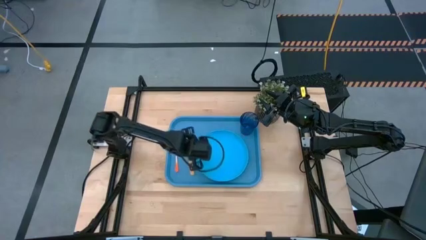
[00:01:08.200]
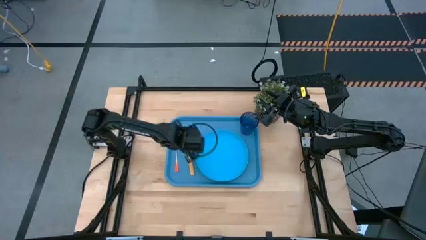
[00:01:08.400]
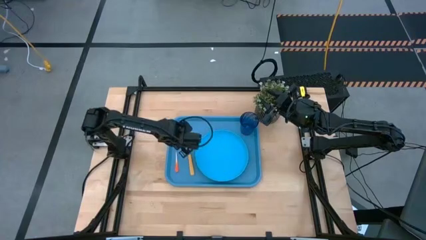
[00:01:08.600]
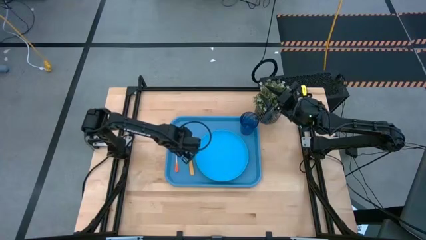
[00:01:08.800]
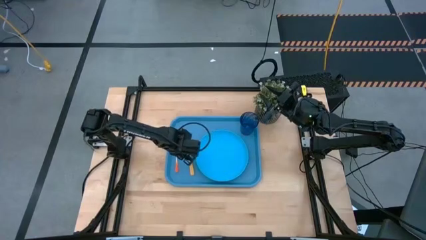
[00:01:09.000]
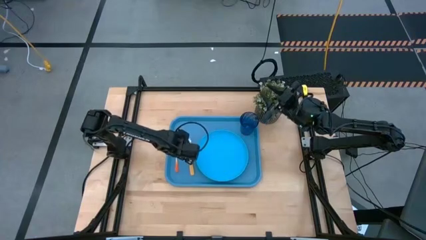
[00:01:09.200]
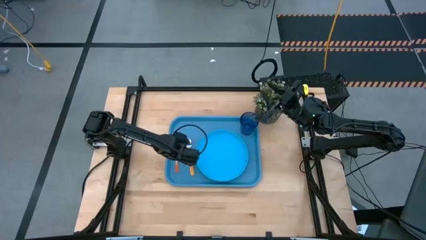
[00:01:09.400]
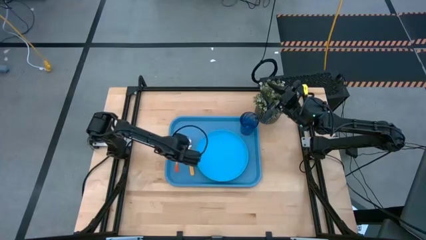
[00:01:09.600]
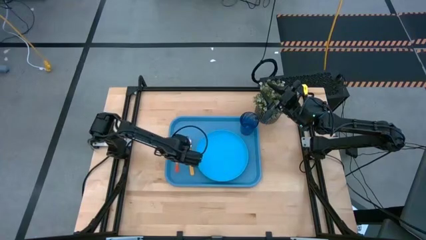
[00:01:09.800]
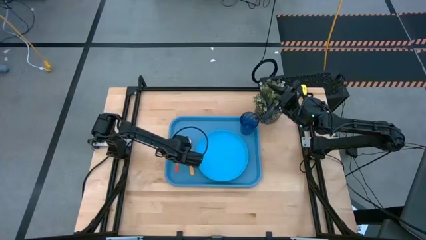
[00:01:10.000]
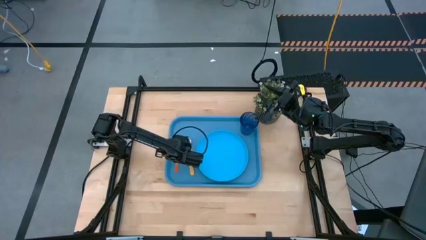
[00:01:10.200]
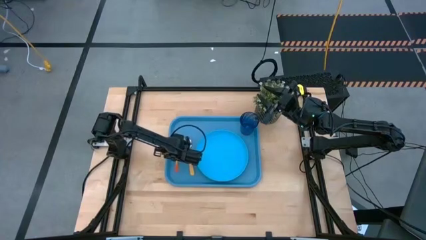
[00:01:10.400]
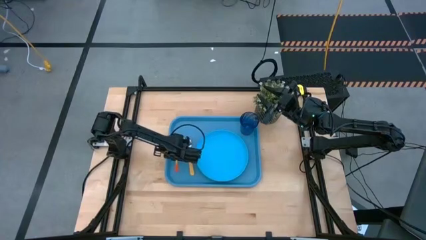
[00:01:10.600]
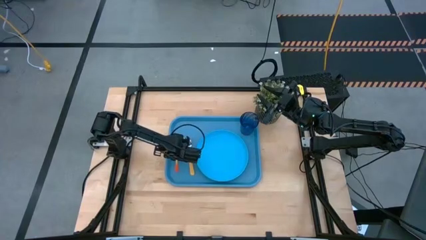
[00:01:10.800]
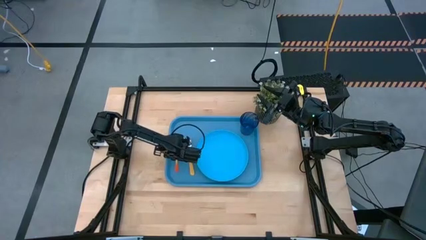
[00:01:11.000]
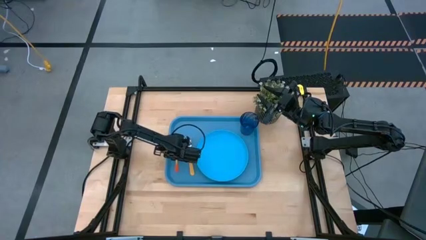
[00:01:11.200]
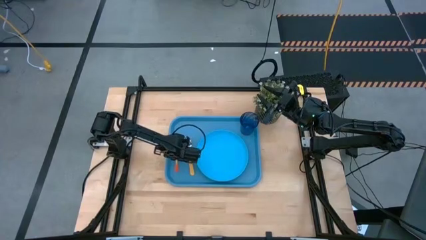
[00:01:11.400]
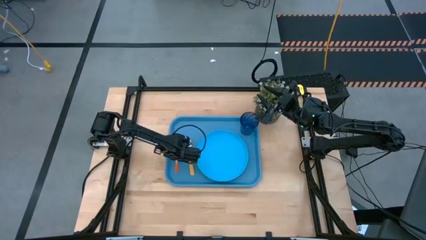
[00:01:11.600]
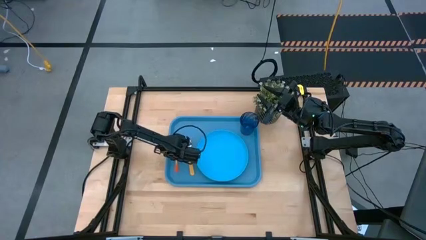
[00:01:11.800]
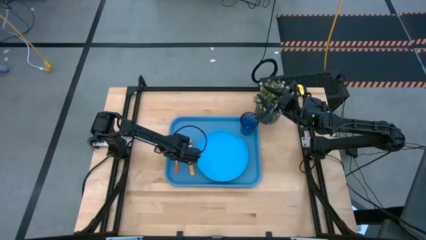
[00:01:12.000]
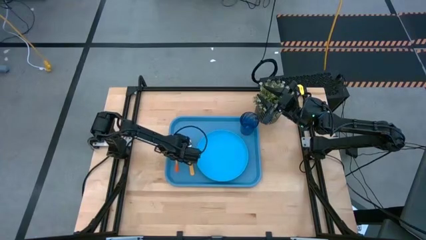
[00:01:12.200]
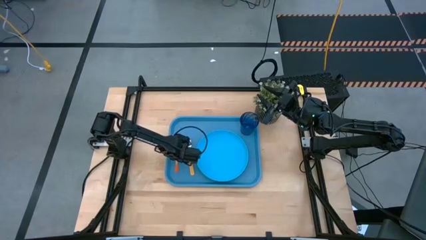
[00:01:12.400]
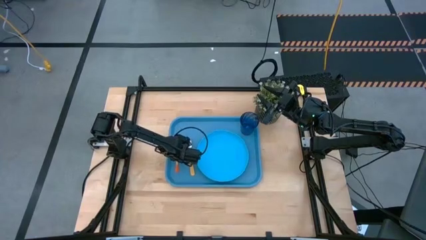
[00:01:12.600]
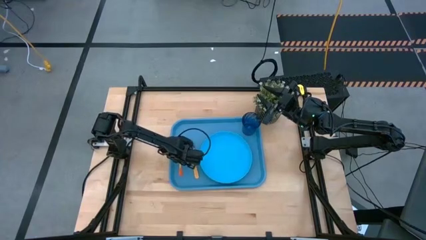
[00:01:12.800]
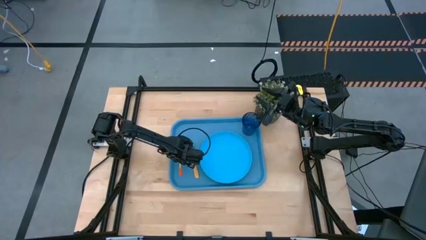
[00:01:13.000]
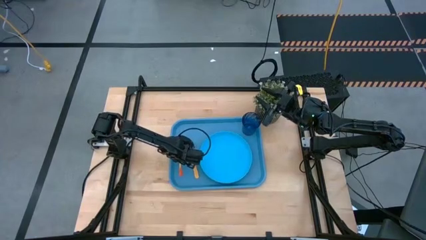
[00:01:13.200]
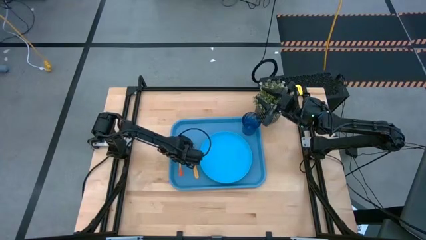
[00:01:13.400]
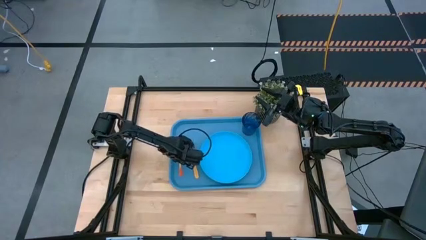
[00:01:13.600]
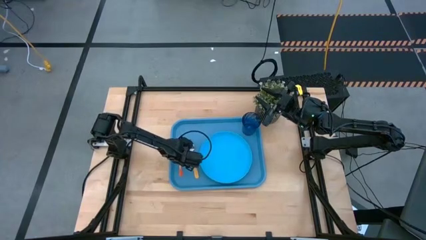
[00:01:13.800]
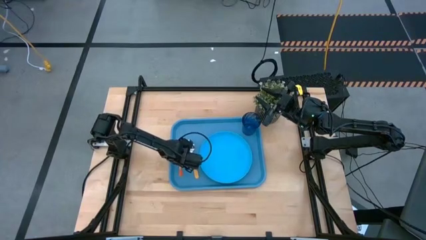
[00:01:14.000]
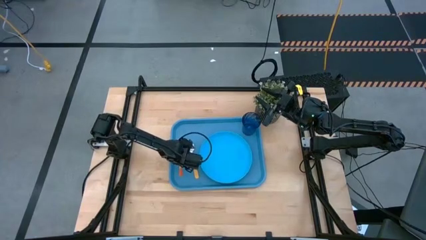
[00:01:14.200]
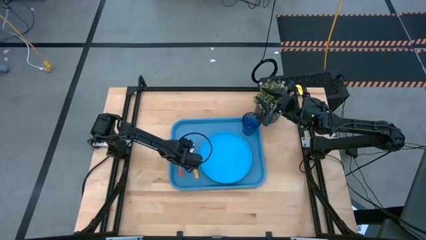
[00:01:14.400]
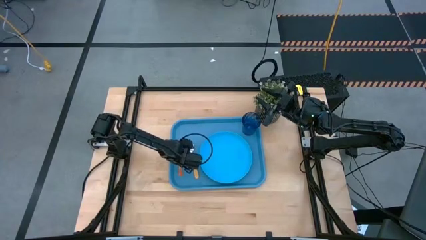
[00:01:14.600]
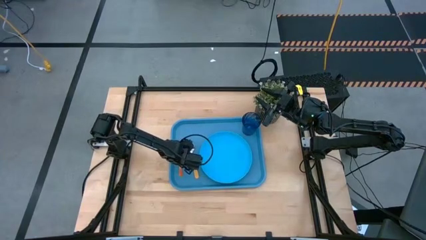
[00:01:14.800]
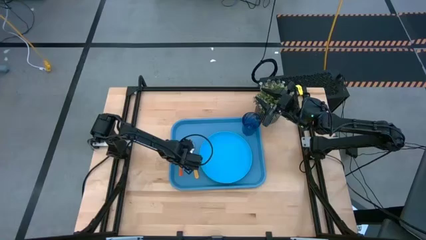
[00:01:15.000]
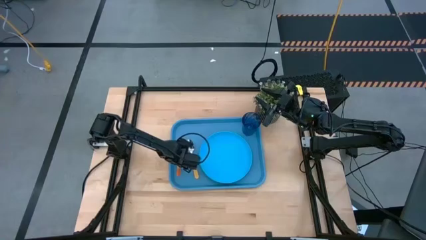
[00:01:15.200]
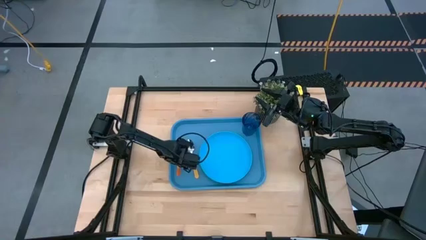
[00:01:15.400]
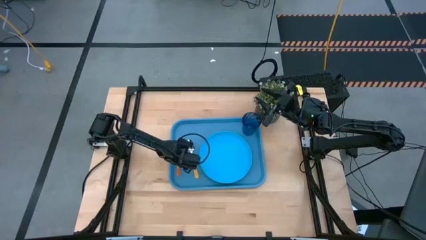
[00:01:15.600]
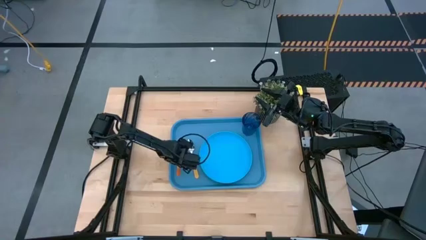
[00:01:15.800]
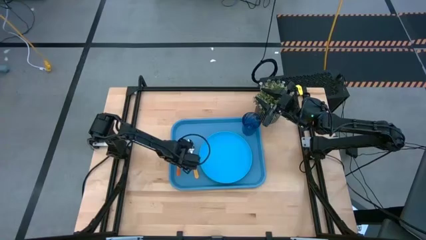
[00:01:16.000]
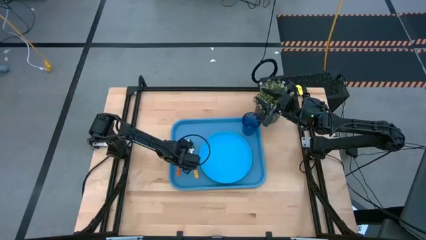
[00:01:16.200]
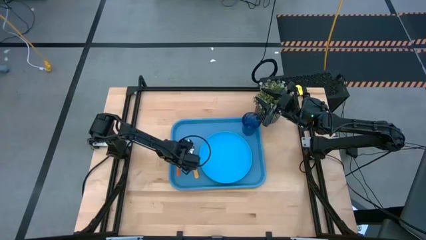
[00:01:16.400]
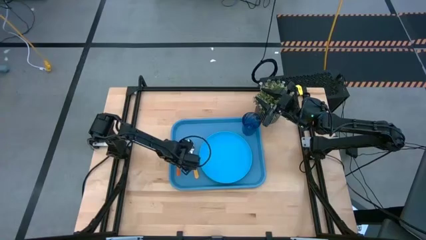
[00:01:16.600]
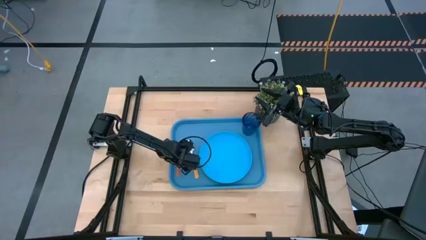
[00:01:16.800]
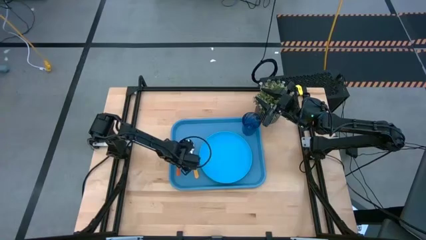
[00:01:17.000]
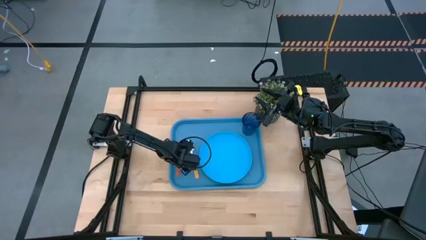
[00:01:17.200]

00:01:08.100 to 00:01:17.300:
Task: Pick and place plate/cup/fork/spoon on tray
Adjust the orange fork

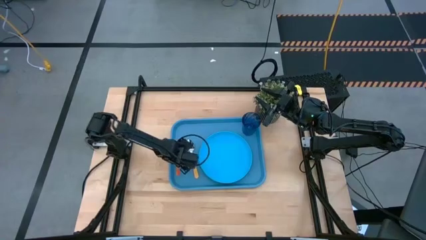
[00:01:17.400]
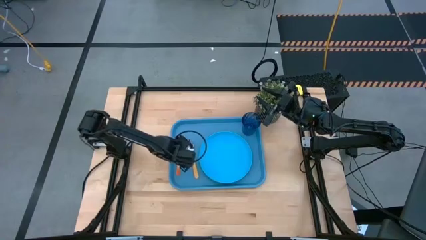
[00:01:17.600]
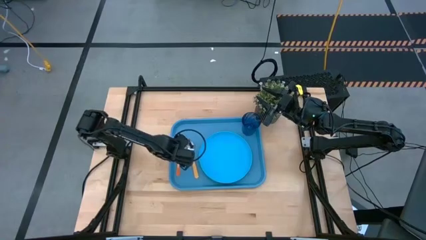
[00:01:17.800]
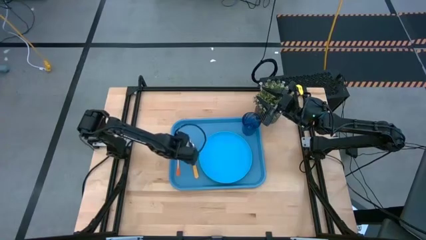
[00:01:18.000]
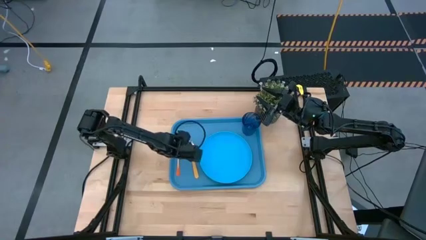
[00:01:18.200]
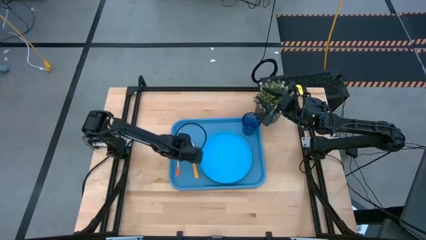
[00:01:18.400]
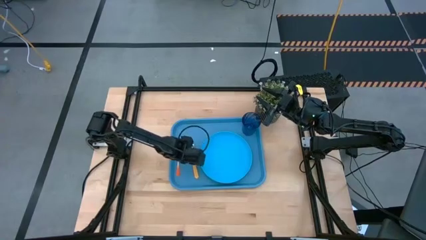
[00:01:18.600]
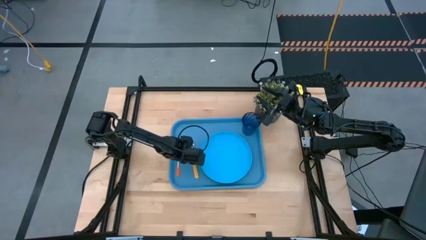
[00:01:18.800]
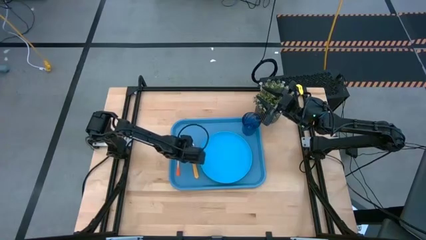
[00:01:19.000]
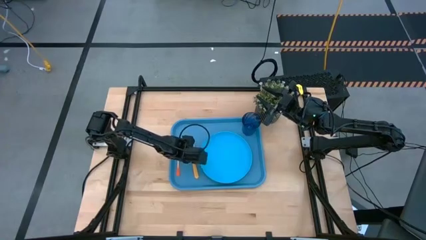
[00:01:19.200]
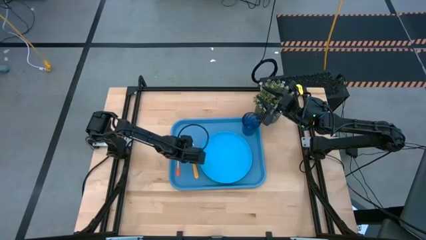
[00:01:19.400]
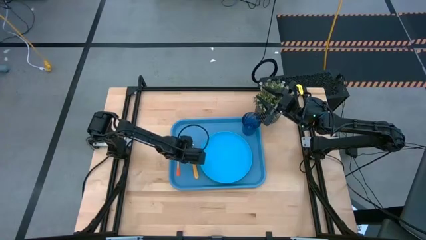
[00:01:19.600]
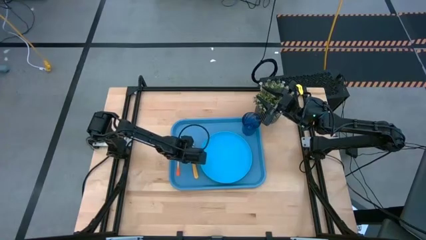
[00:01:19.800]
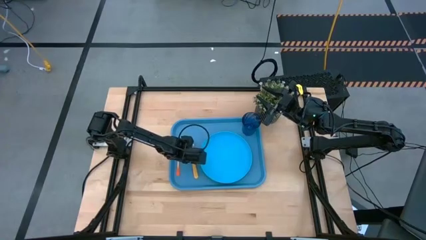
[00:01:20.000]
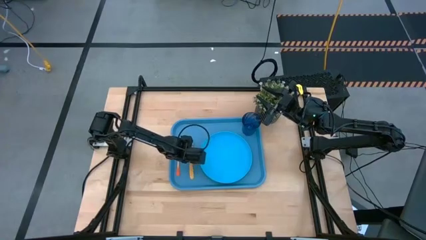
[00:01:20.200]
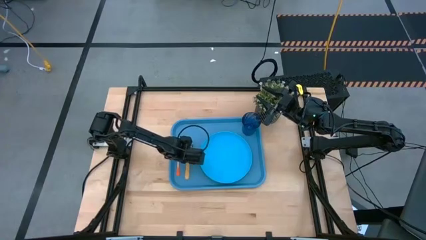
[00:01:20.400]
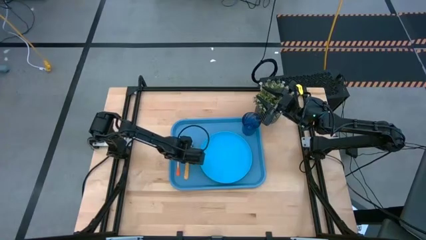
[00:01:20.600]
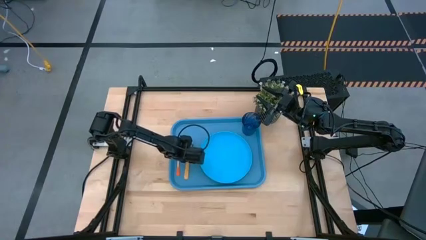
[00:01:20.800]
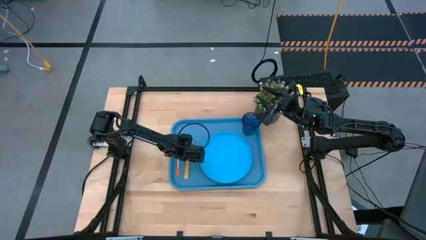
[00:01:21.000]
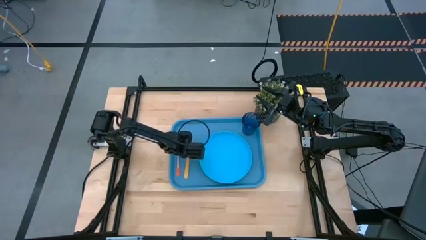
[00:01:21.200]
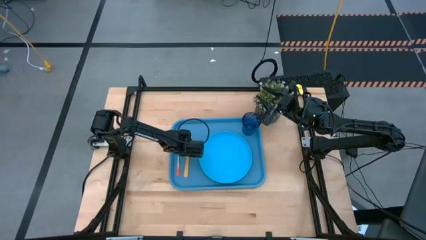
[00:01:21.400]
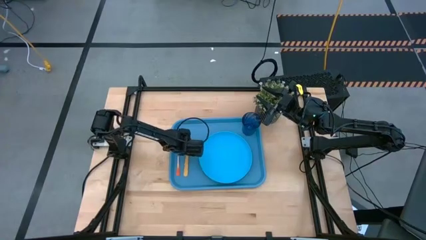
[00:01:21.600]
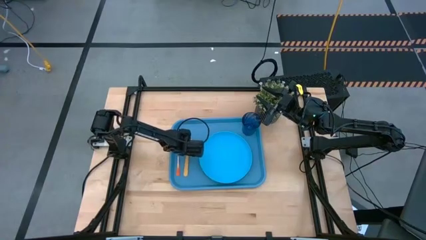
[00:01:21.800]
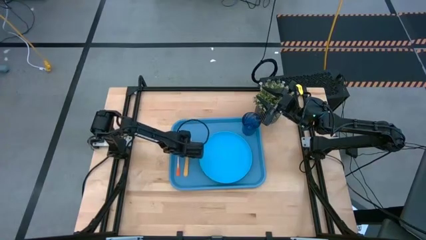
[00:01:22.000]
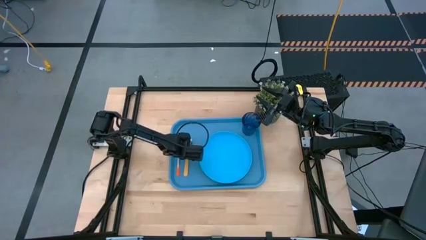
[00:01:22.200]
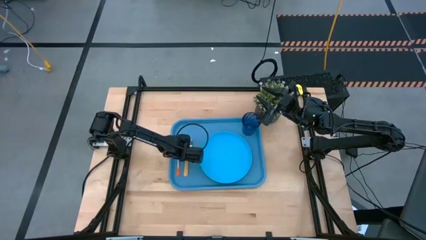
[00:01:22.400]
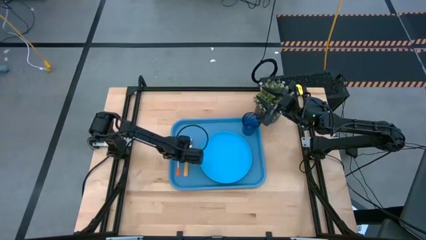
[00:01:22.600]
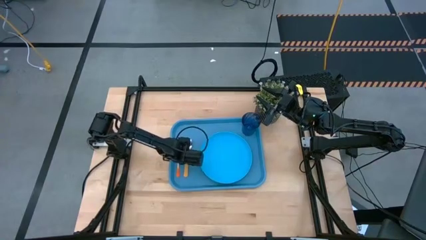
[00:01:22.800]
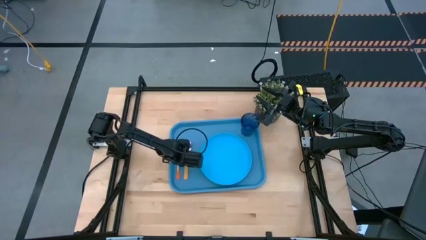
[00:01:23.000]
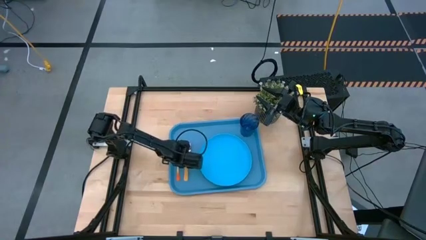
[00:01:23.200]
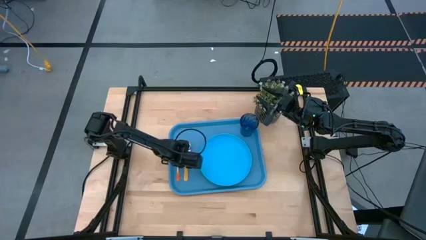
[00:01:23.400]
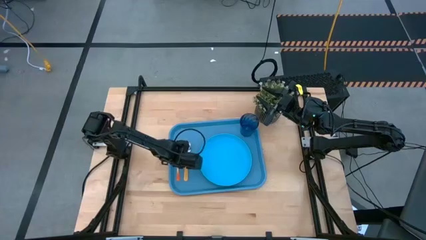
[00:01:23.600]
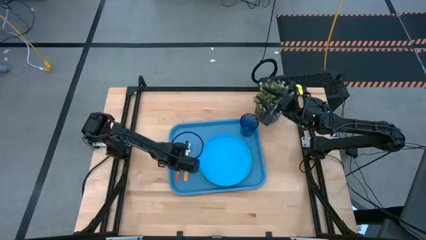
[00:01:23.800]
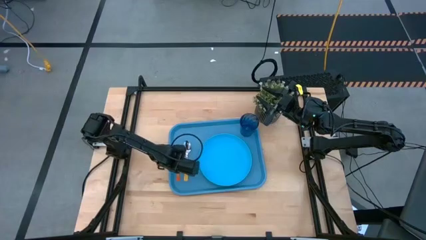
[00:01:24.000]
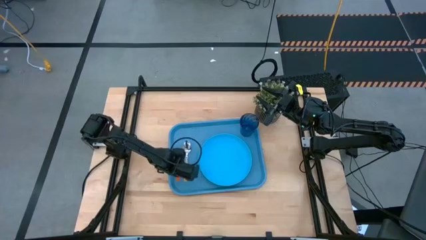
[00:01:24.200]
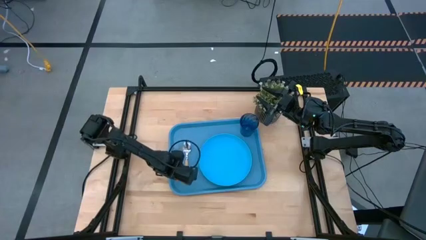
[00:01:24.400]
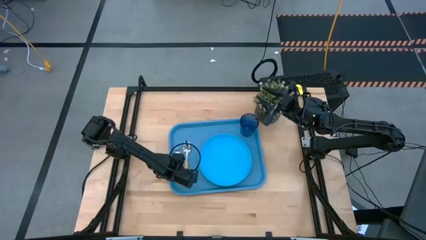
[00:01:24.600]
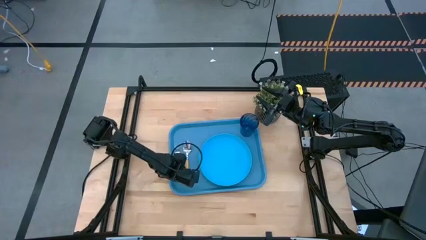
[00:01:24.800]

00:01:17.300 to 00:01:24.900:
Adjust the yellow spoon
